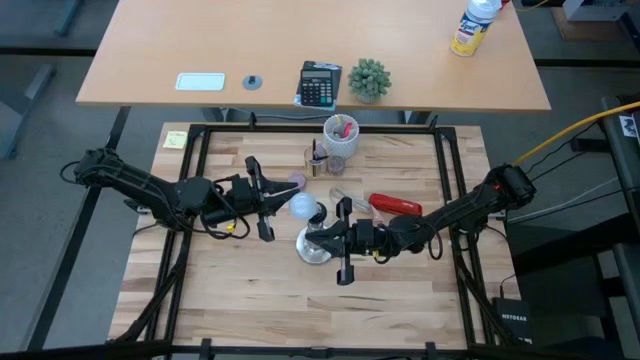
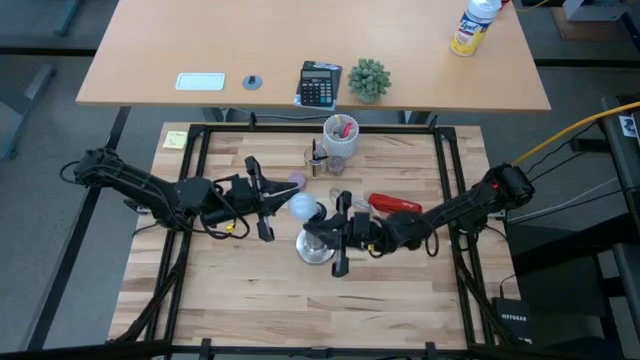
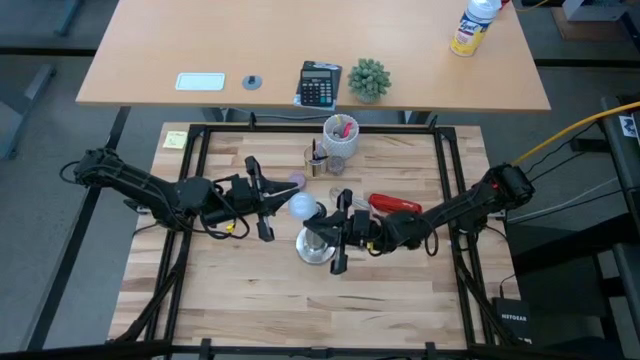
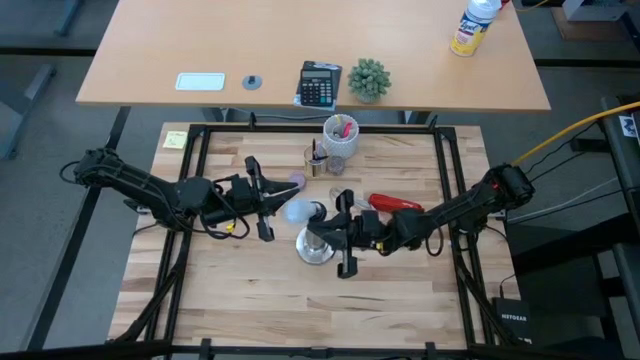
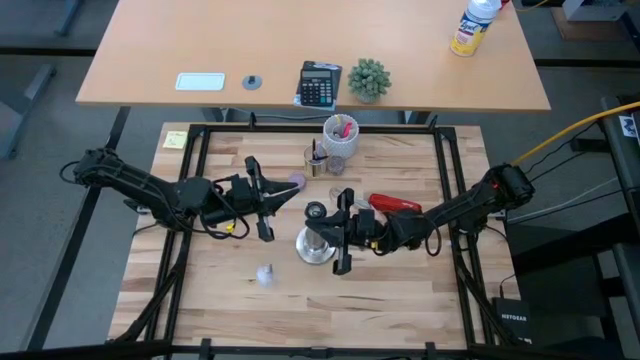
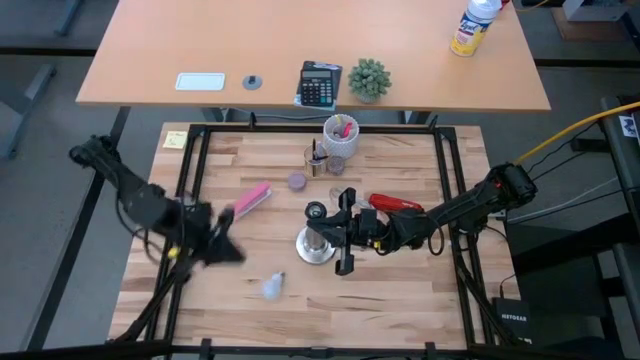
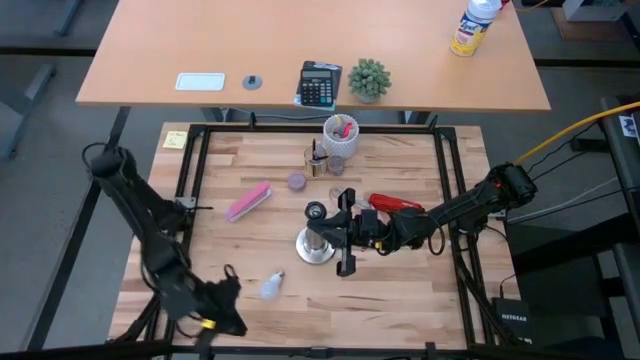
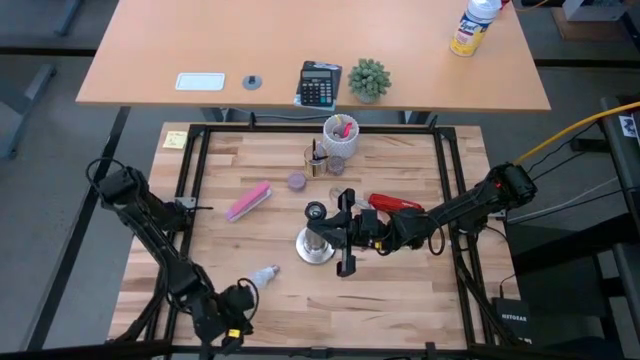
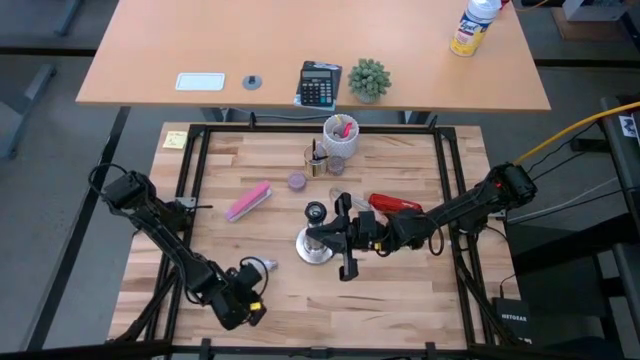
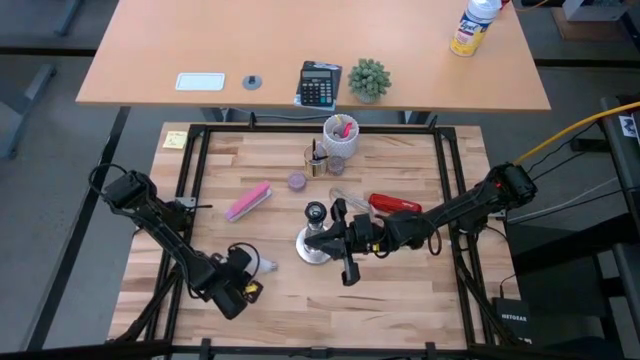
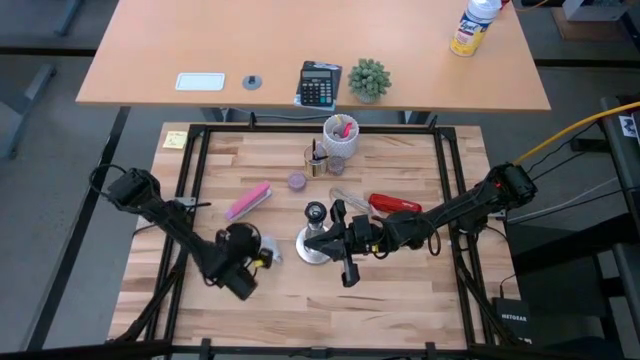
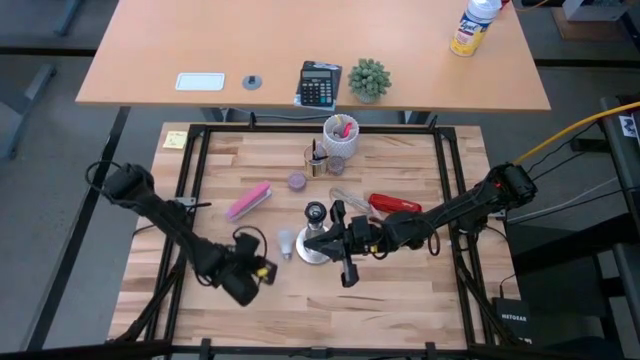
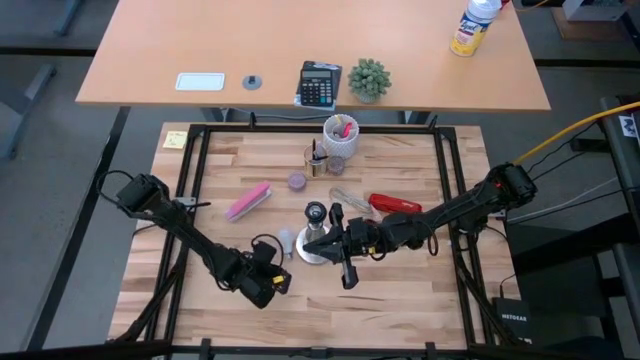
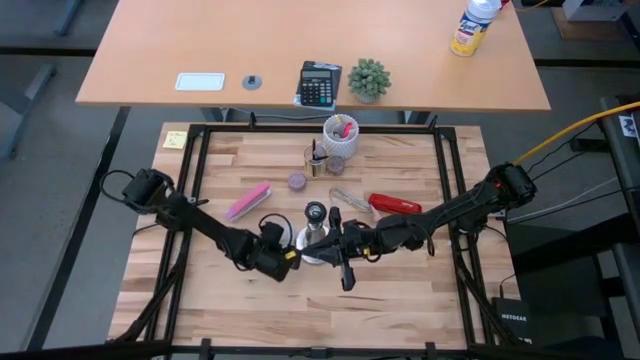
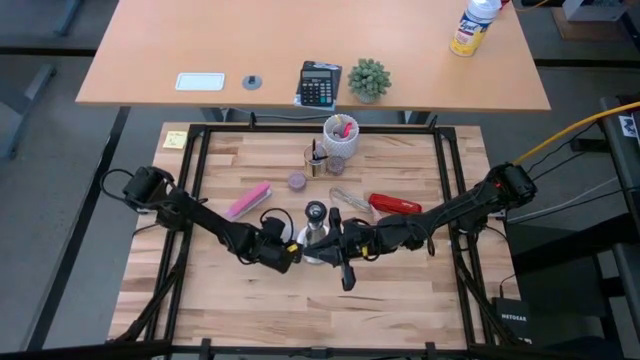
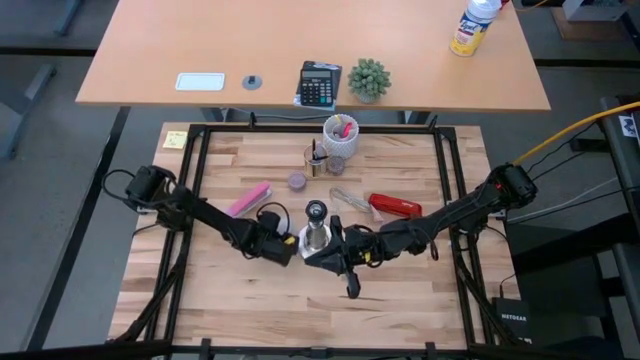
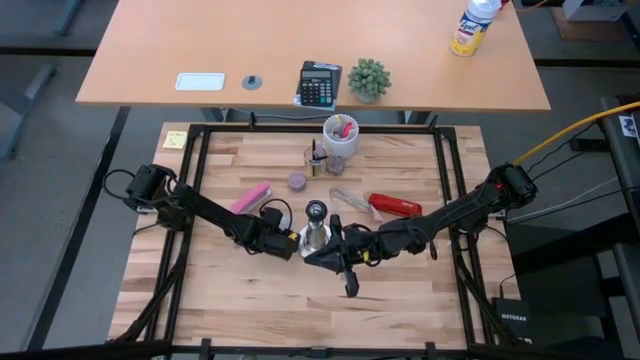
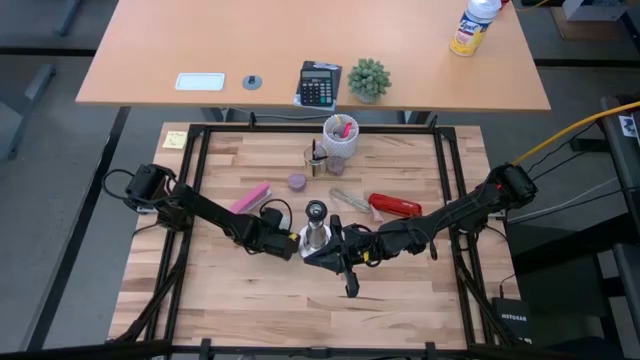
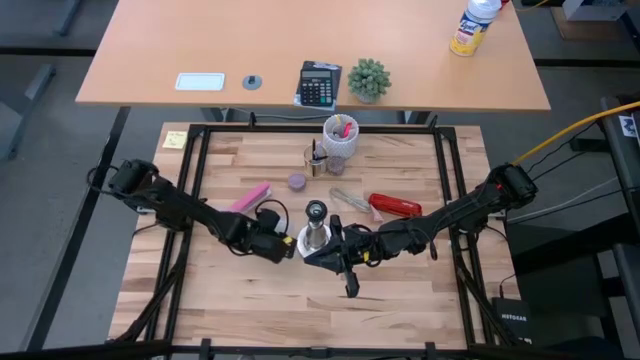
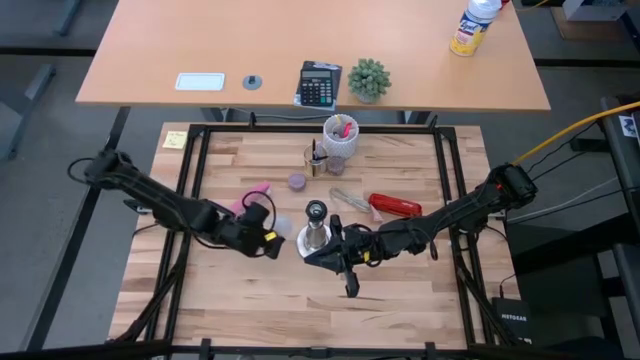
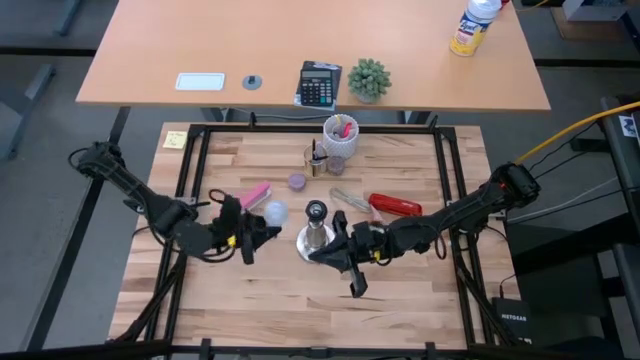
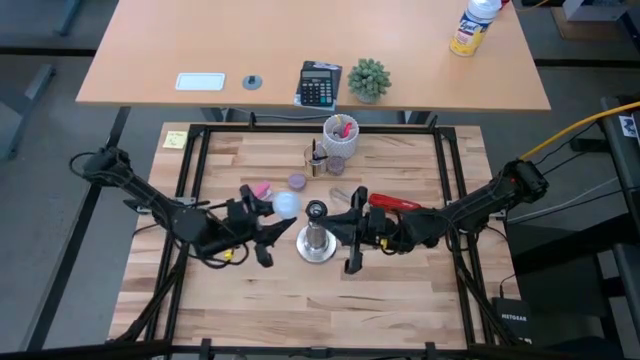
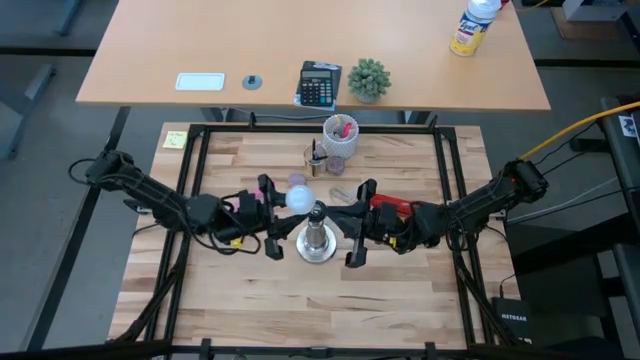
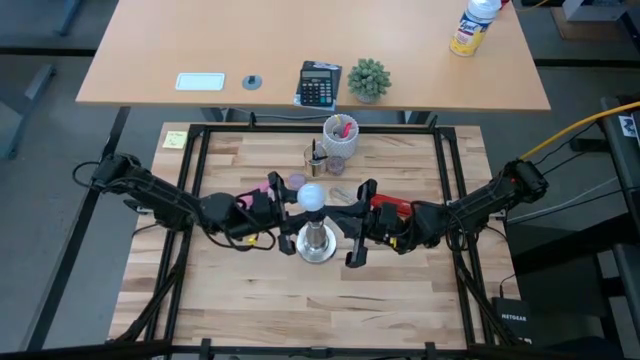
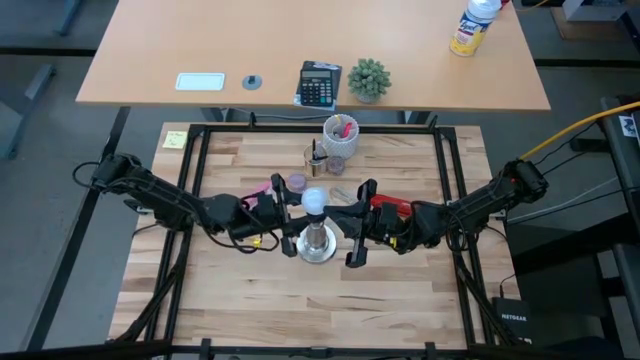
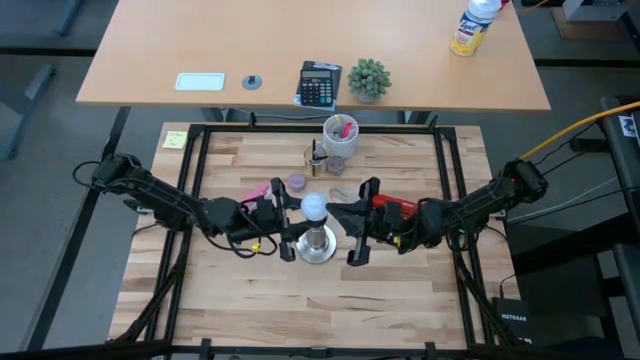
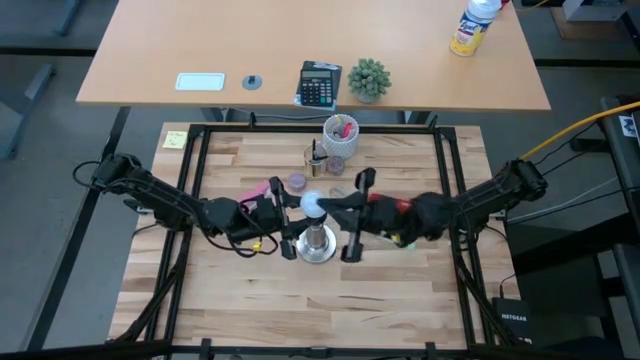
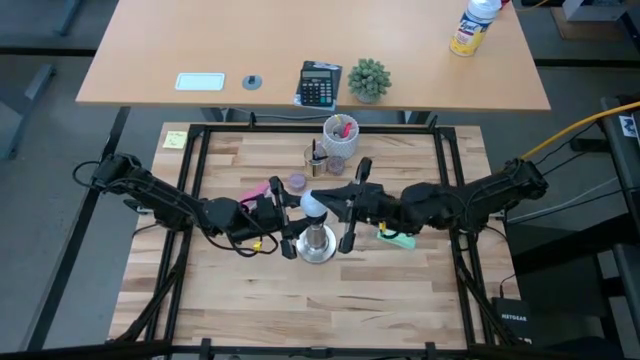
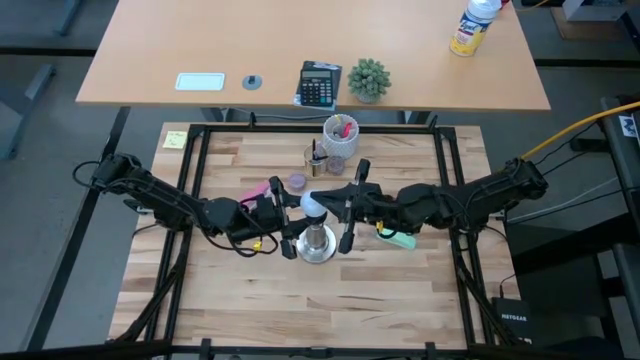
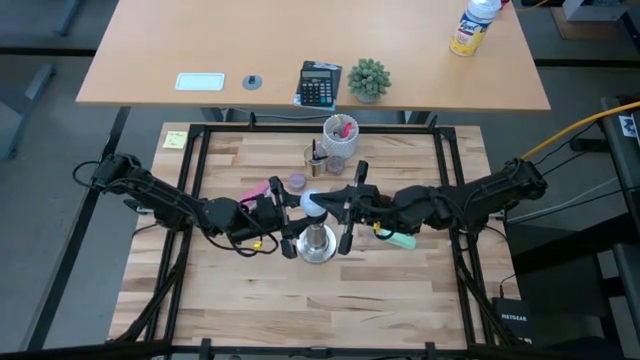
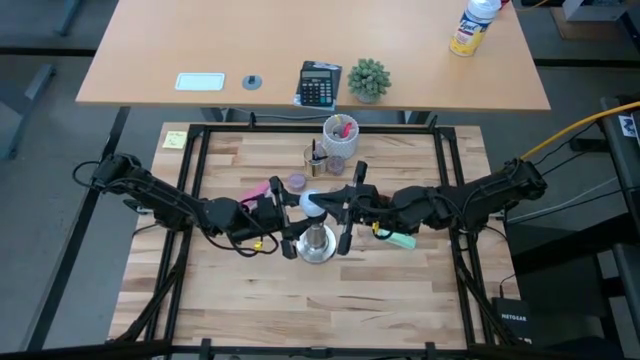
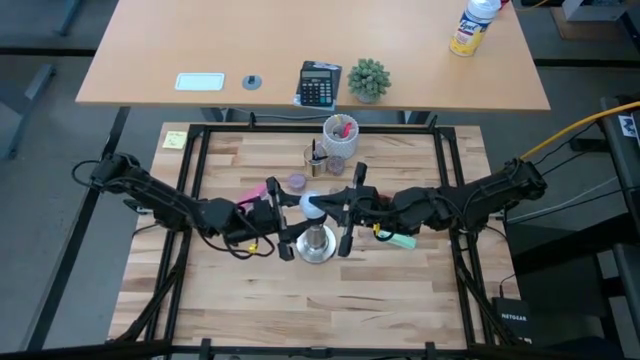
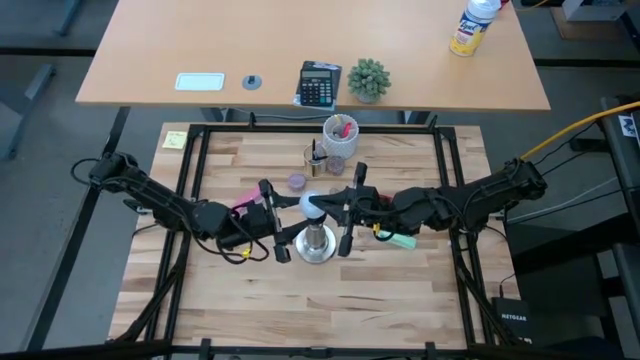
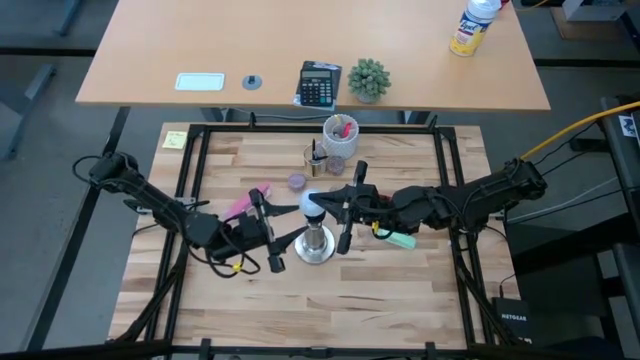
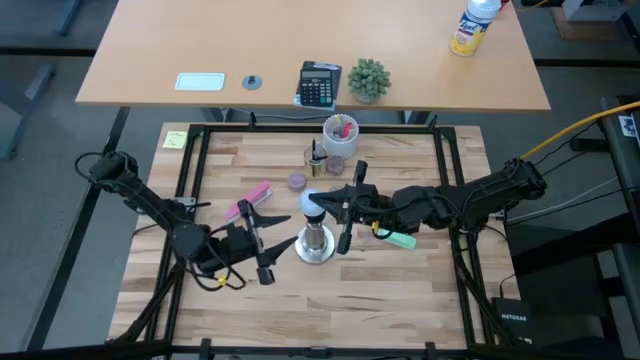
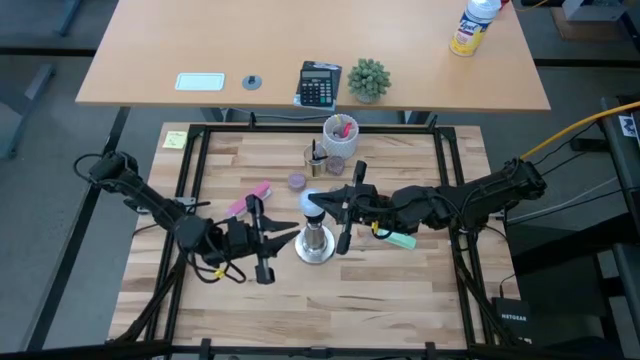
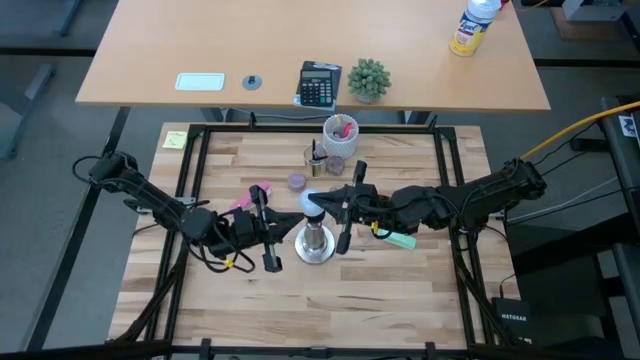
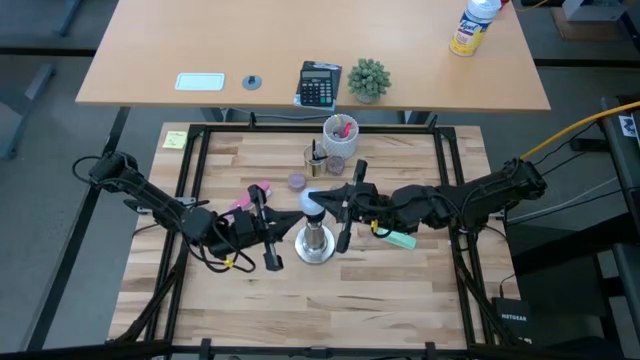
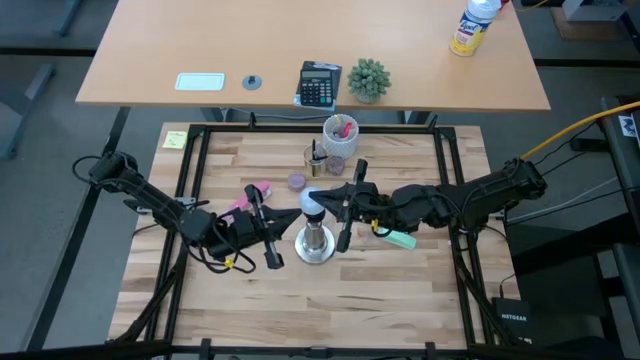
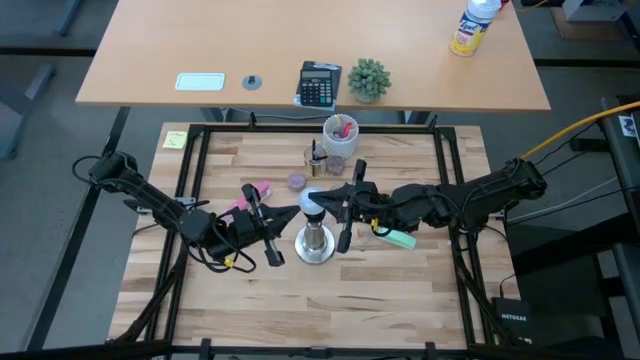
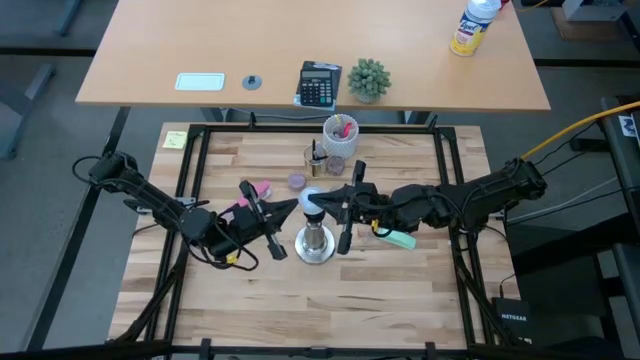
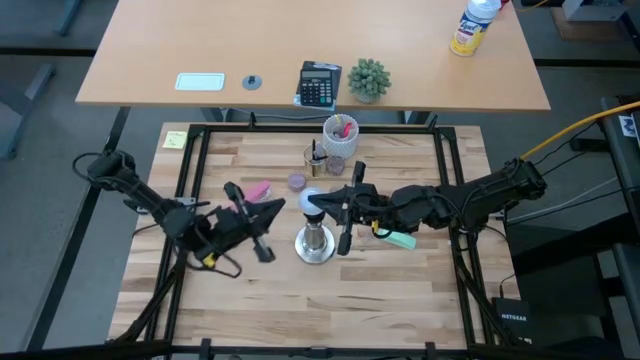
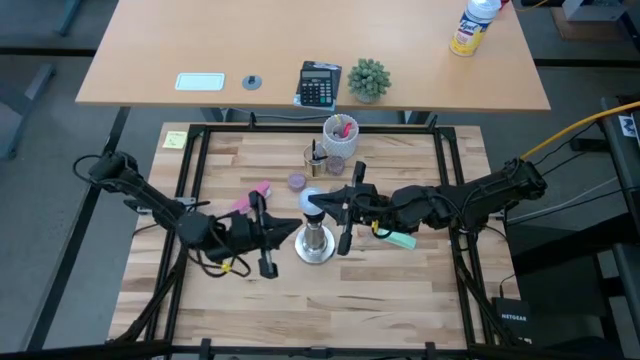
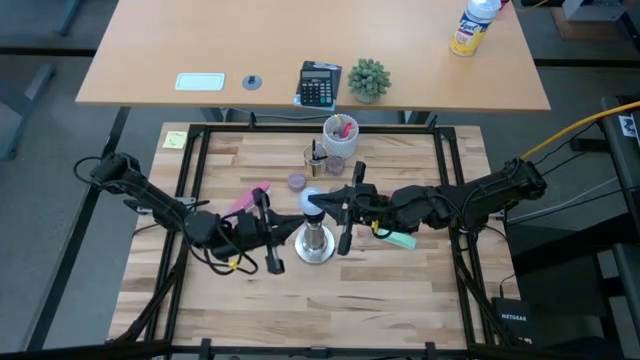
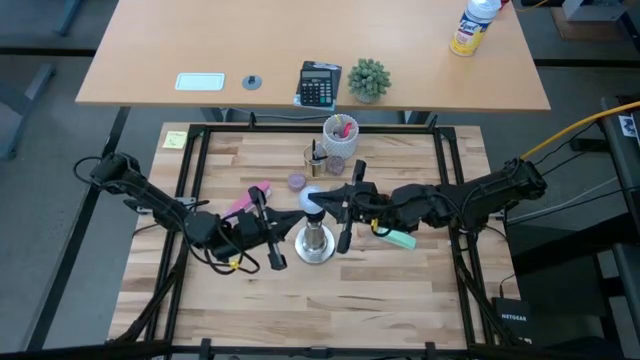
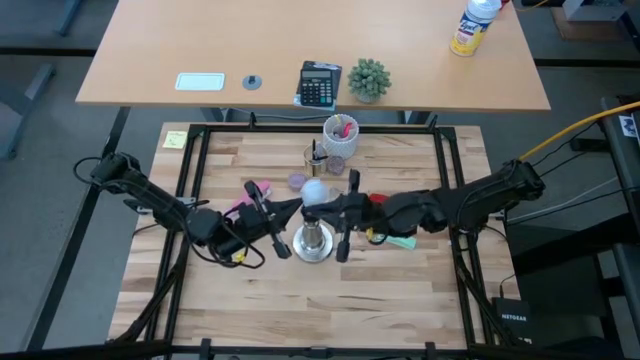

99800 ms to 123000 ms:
Task: Screw lightbulb
Insert the lightbulb into the lamp socket
